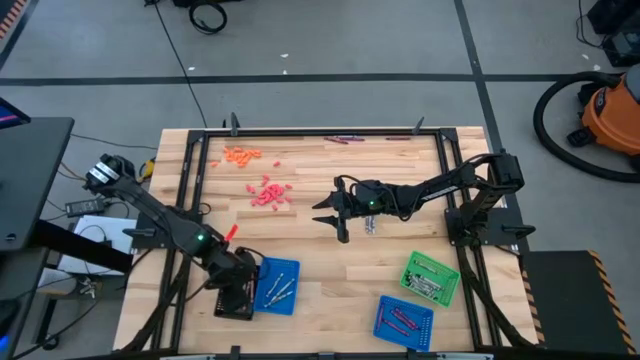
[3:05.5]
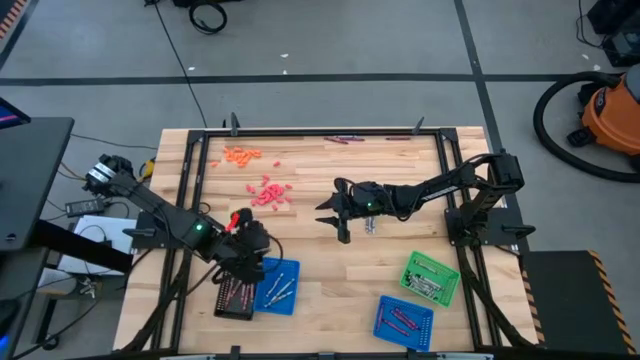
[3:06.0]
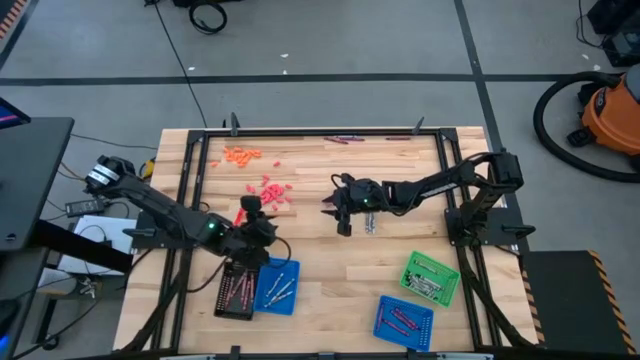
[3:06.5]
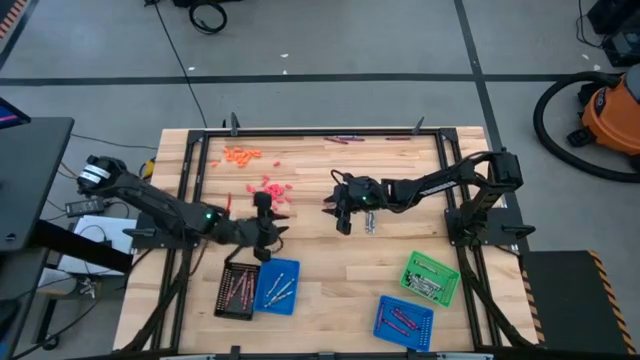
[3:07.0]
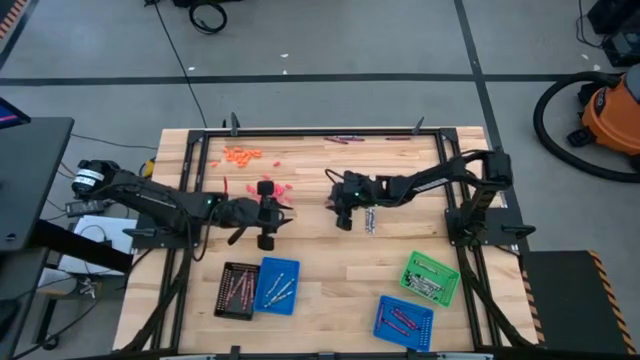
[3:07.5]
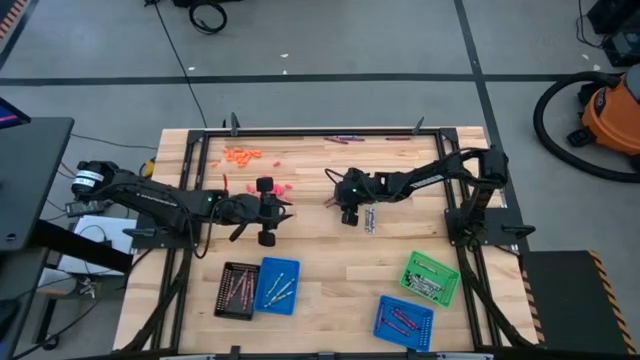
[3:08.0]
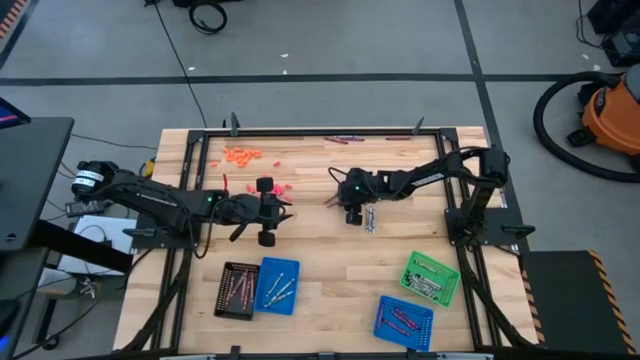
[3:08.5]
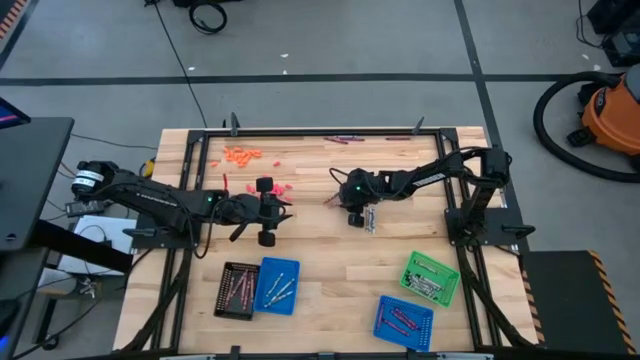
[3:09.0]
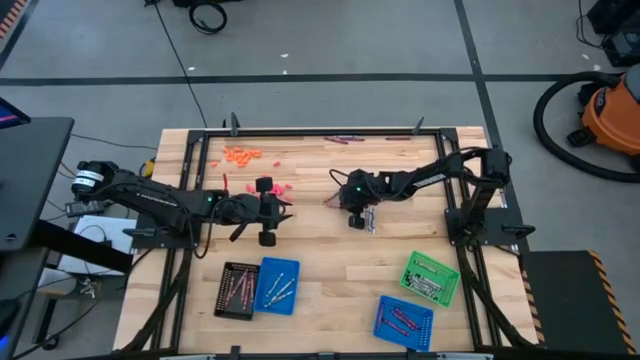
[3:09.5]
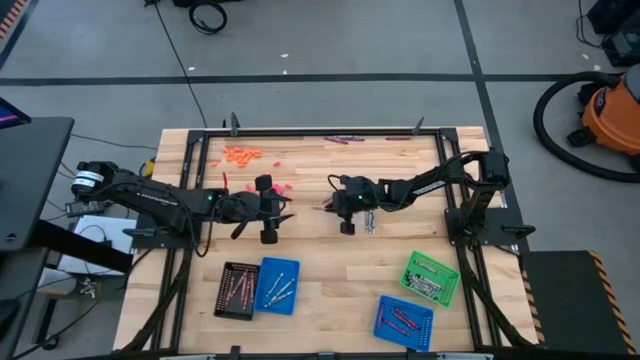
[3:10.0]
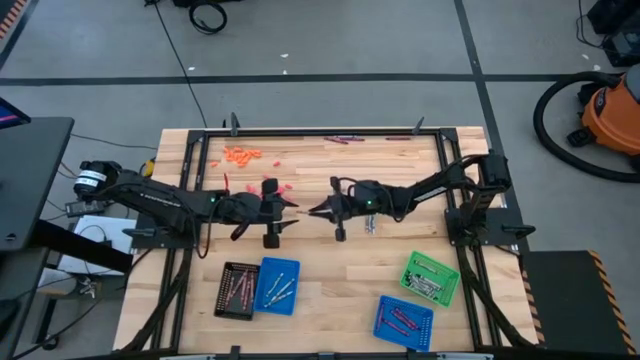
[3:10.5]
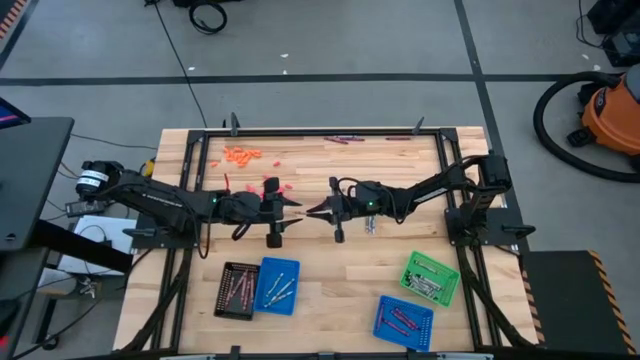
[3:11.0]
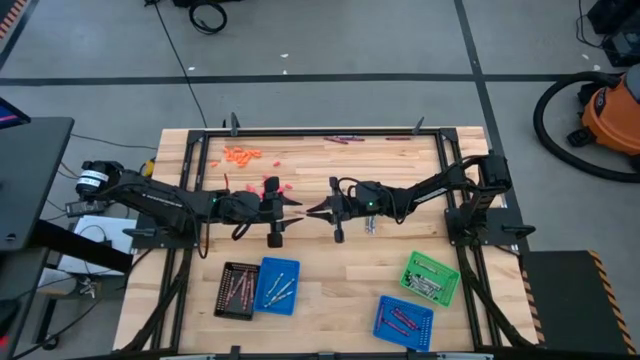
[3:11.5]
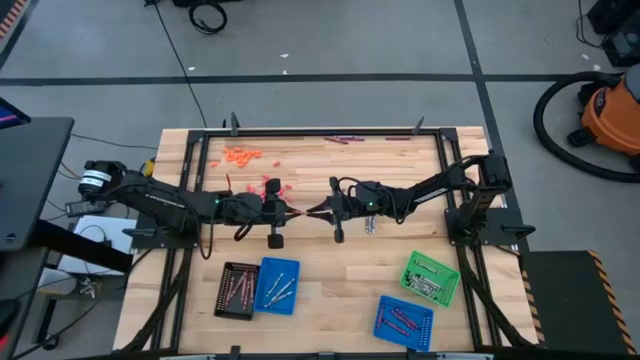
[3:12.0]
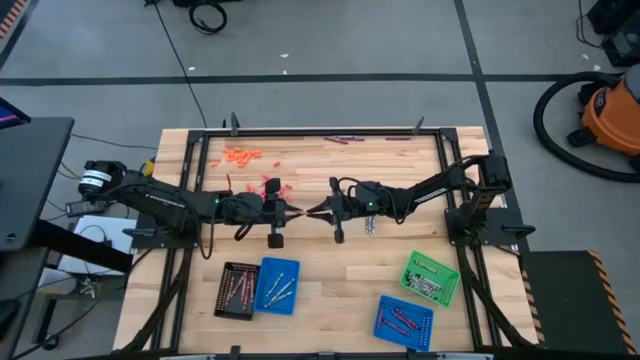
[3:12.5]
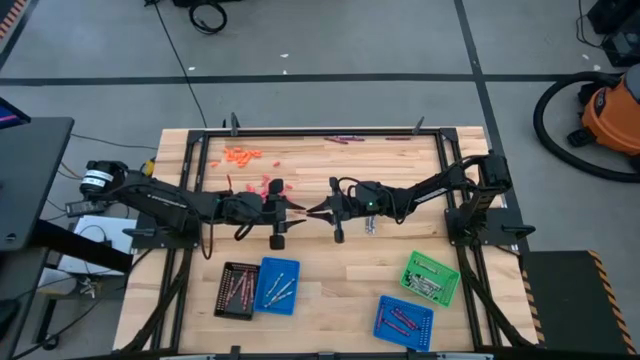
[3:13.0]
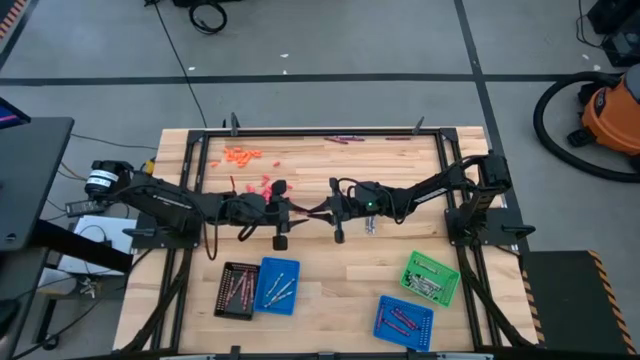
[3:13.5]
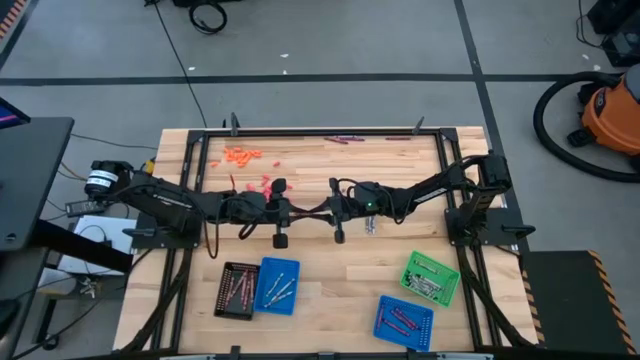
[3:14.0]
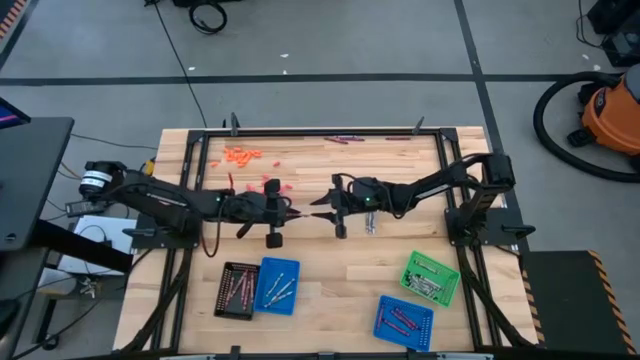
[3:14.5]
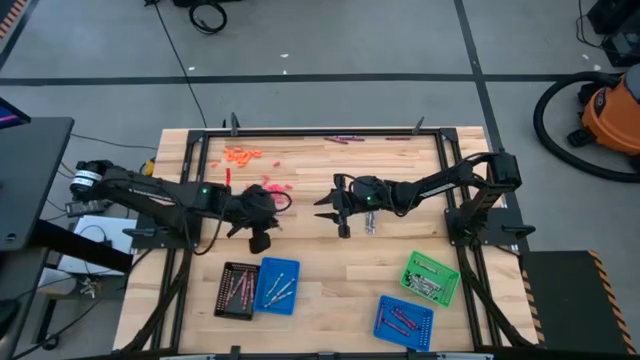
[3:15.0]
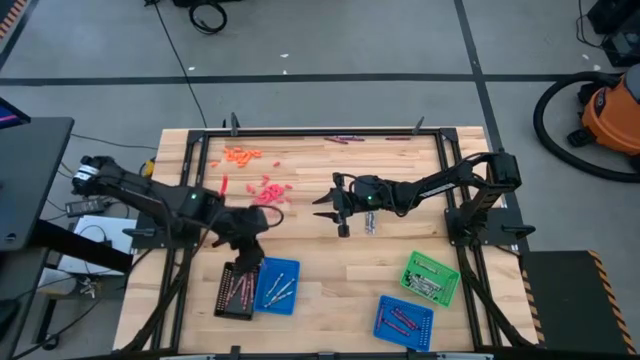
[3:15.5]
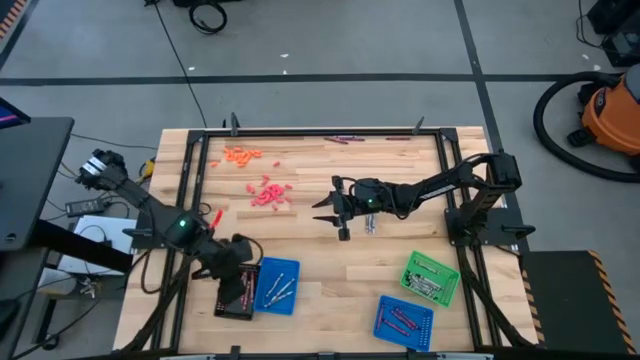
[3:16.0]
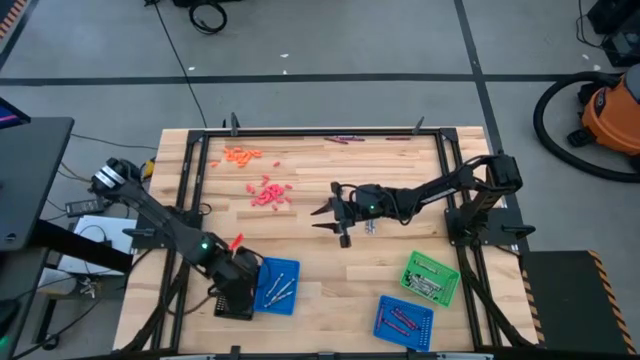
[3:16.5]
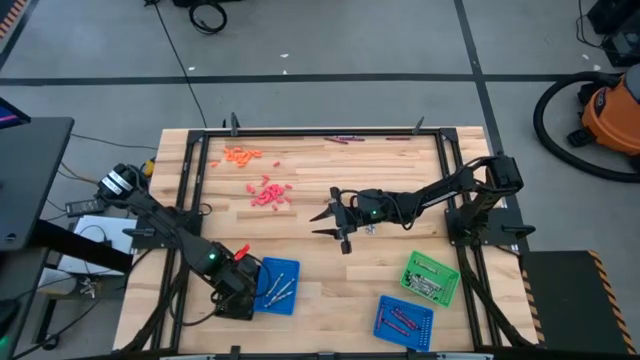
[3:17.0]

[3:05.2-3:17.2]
Task: Sort crayons
Put the pink crayon into the black bin

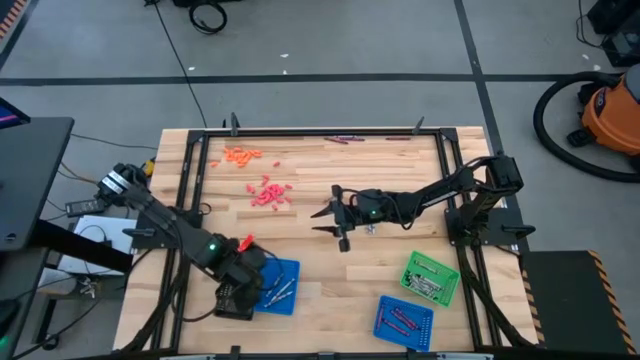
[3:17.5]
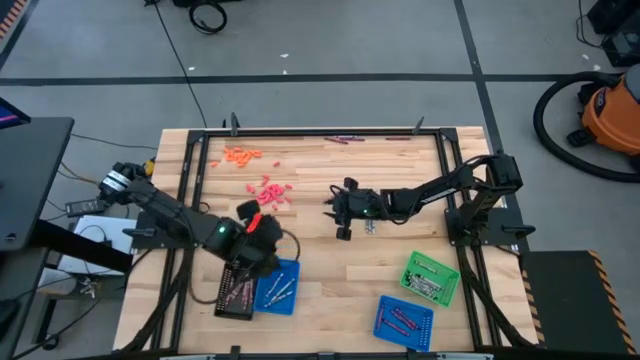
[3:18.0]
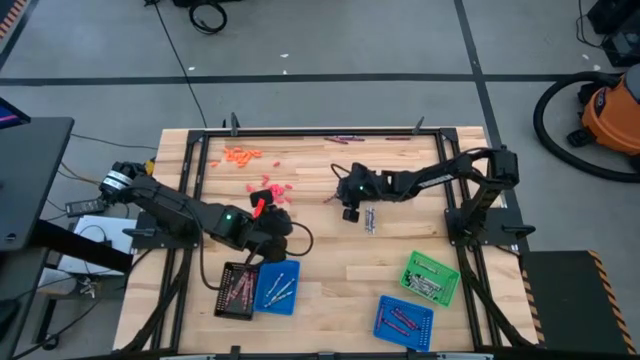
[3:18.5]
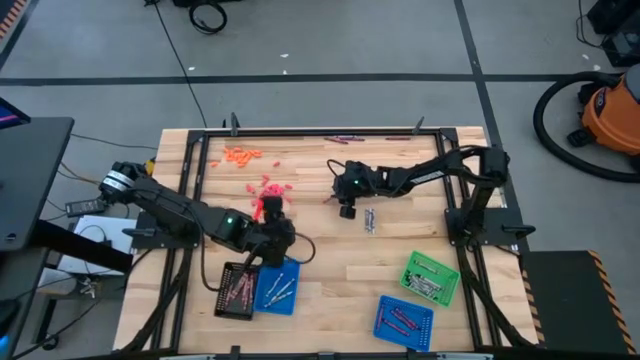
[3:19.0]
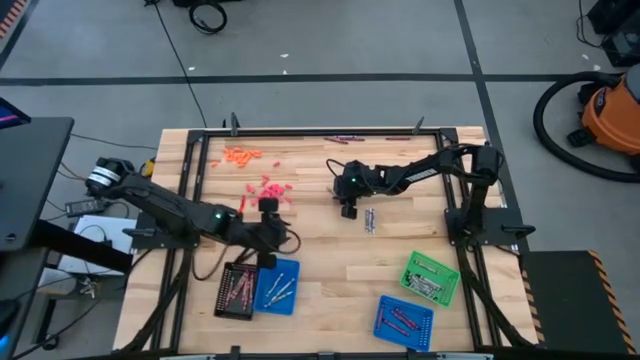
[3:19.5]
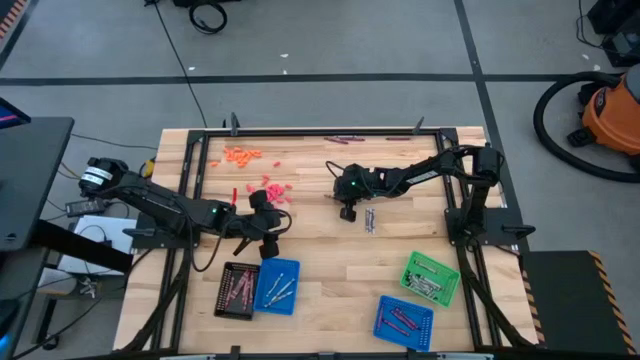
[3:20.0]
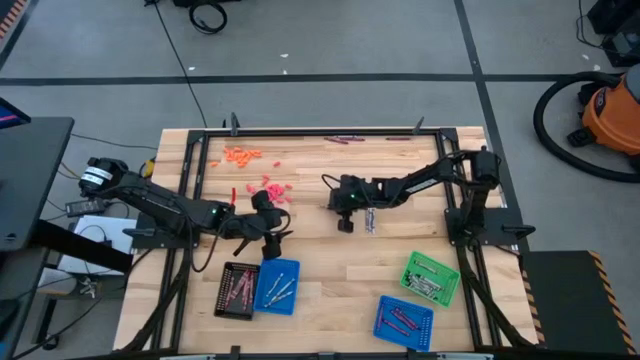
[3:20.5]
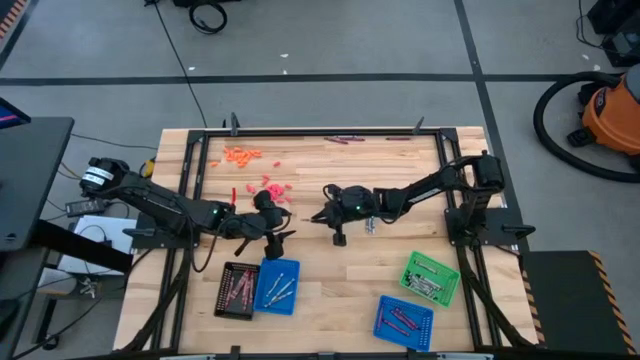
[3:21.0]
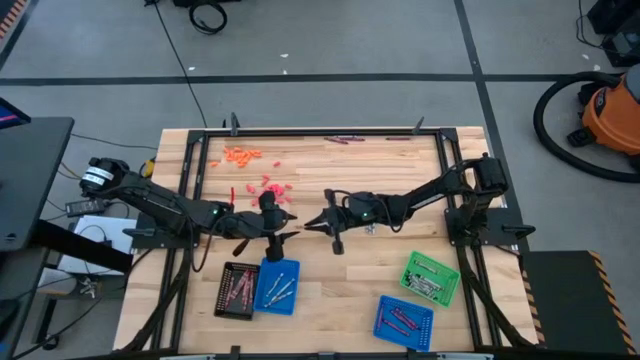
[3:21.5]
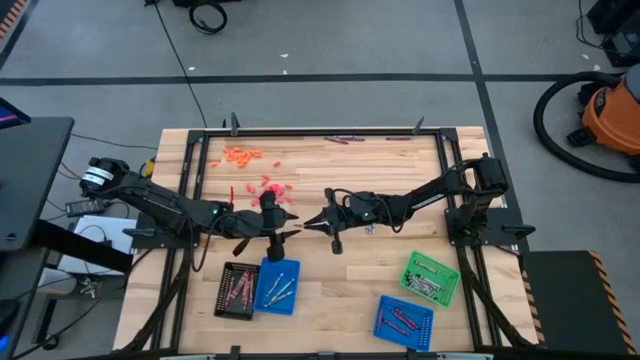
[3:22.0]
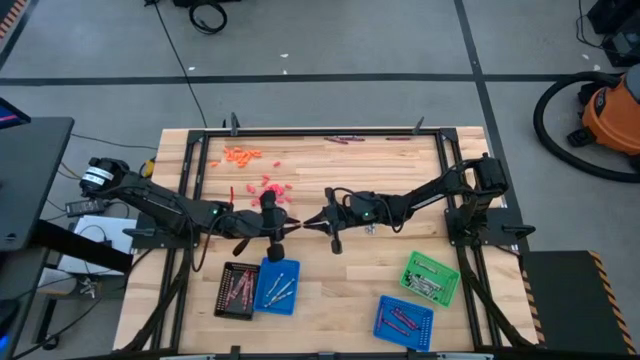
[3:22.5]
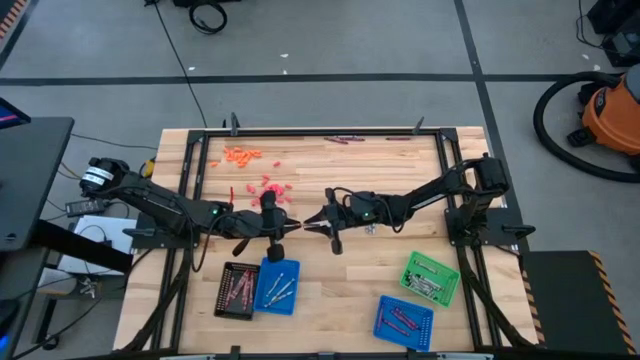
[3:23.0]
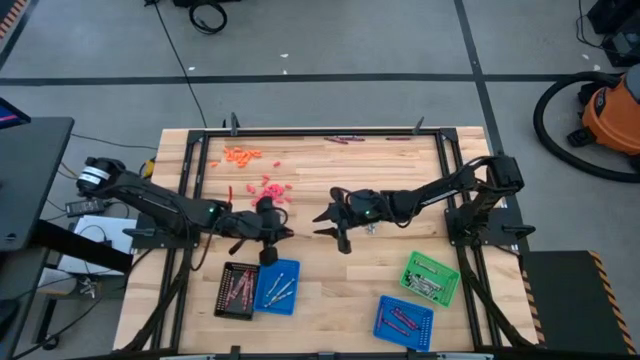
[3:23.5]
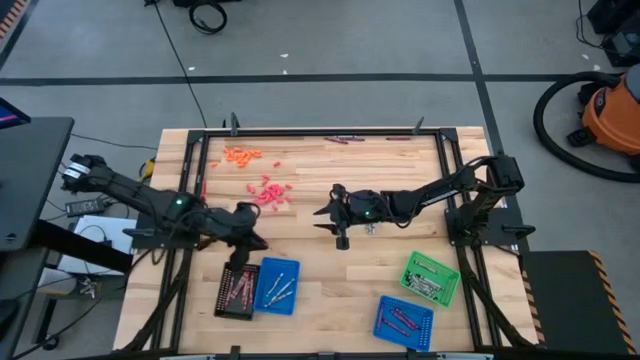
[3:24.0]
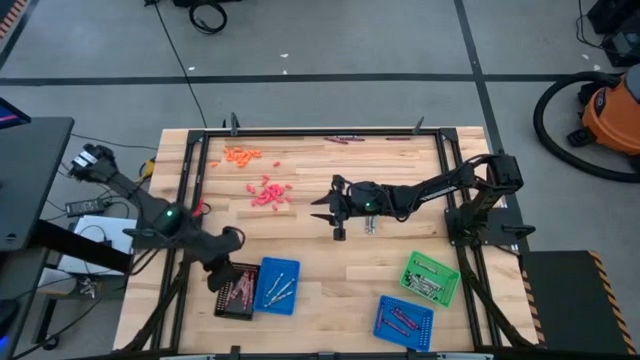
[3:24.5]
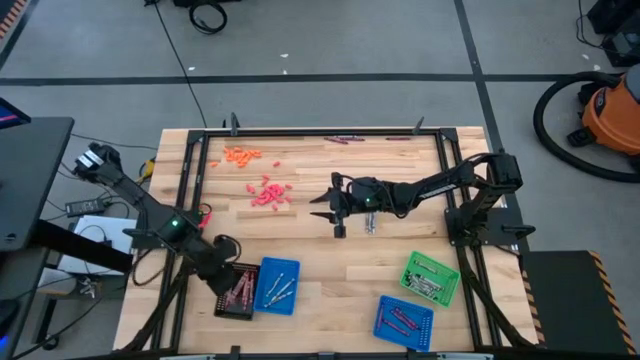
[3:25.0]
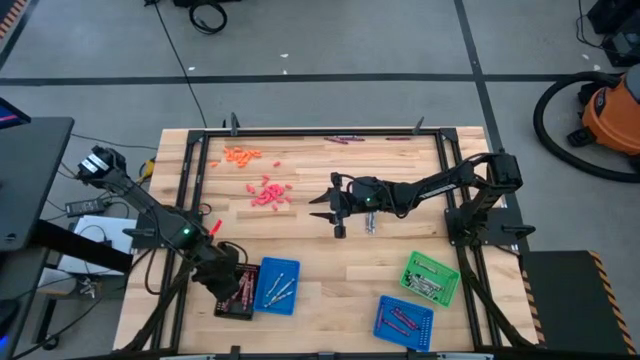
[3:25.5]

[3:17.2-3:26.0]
Put the pink crayon into the black bin

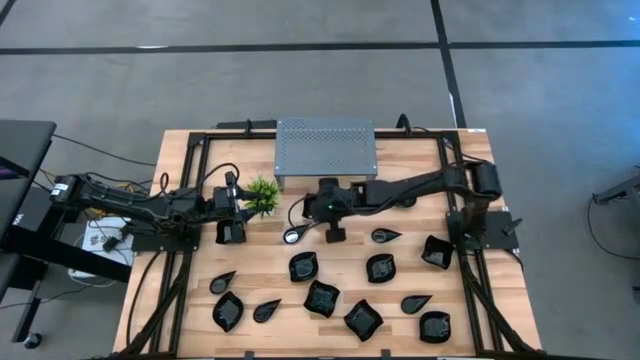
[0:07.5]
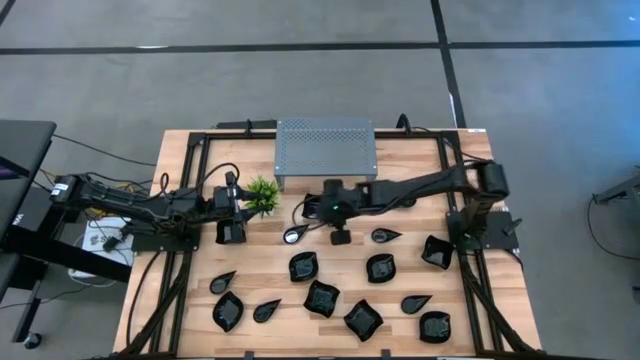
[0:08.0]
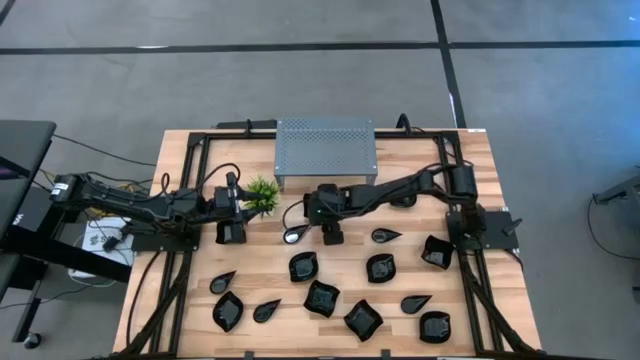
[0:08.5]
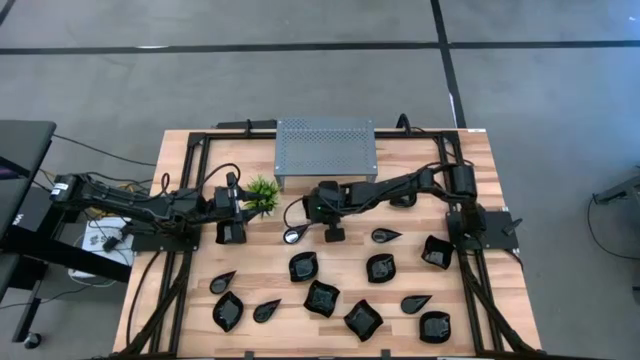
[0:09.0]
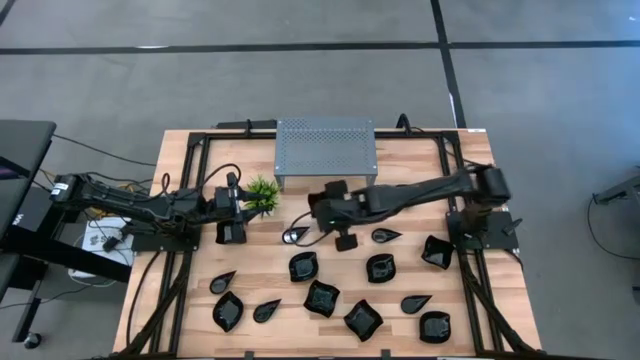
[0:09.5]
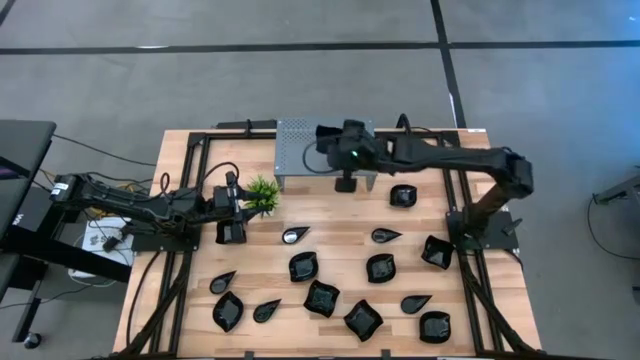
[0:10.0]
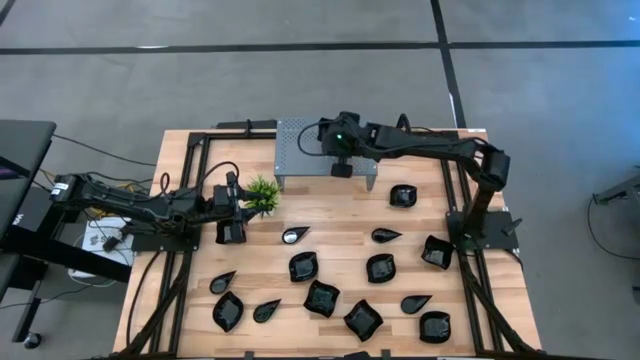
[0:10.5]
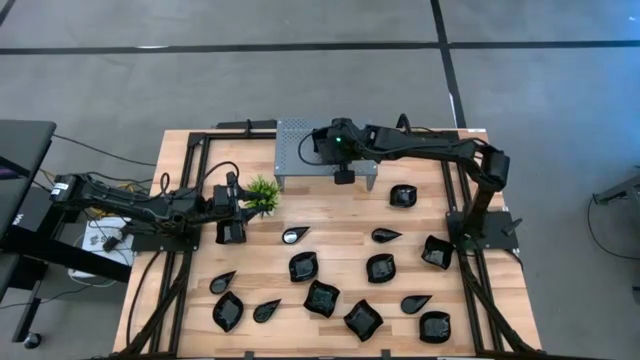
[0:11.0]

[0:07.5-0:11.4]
Task: Pick & Place Mini shaped plates
Put the black distorted square plate on the shelf
